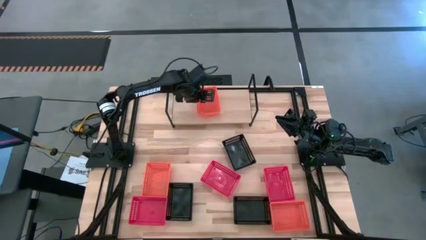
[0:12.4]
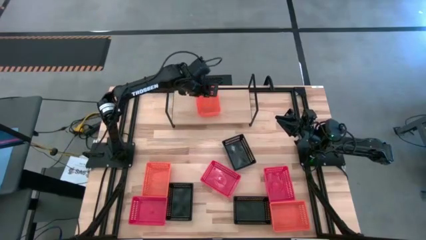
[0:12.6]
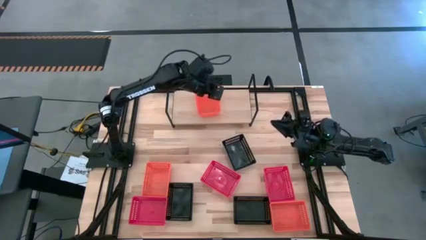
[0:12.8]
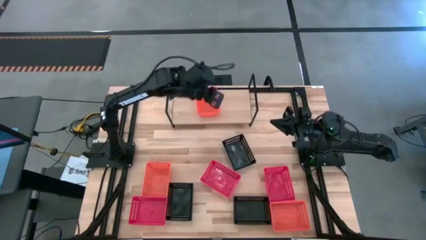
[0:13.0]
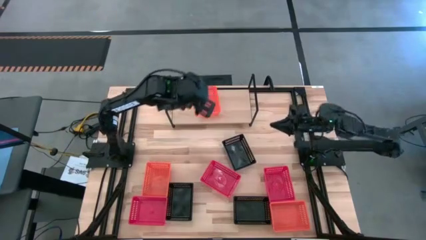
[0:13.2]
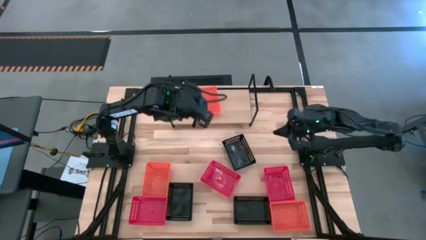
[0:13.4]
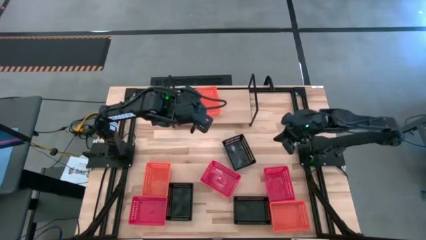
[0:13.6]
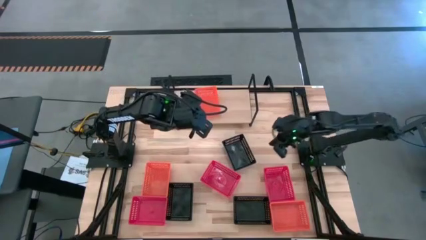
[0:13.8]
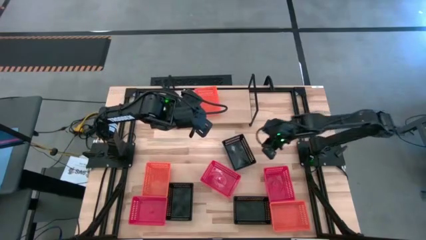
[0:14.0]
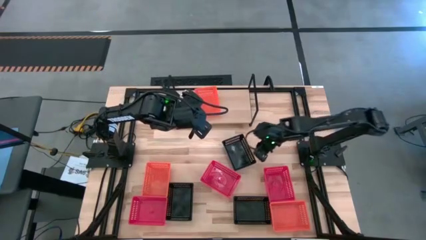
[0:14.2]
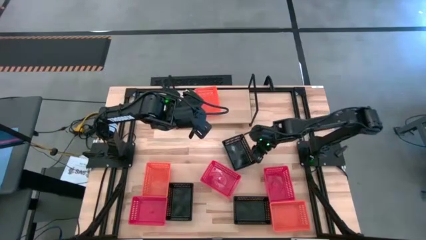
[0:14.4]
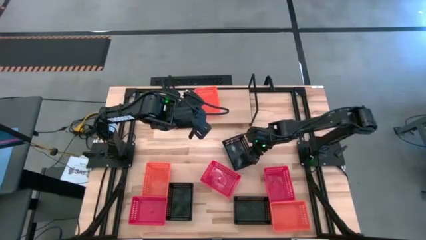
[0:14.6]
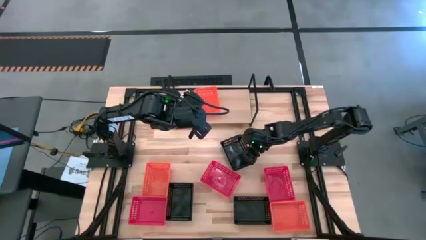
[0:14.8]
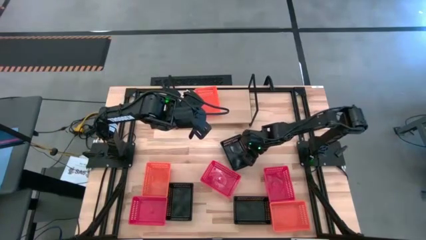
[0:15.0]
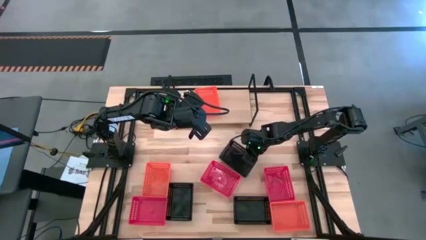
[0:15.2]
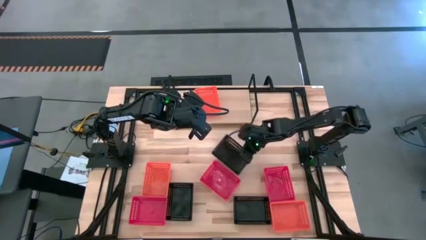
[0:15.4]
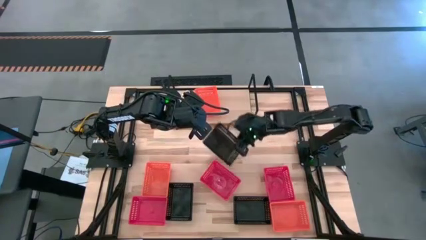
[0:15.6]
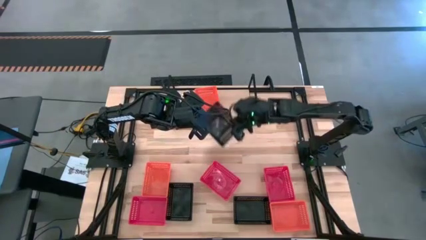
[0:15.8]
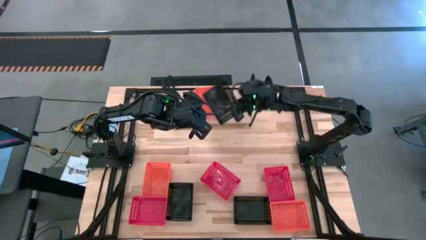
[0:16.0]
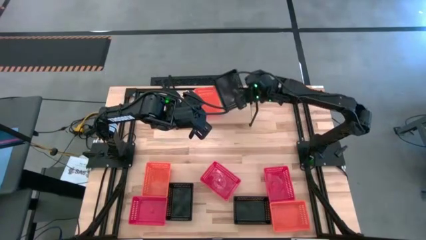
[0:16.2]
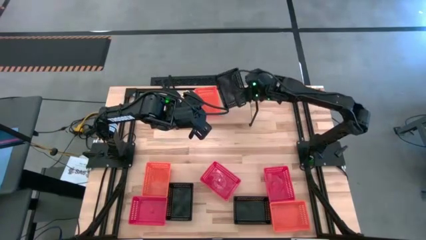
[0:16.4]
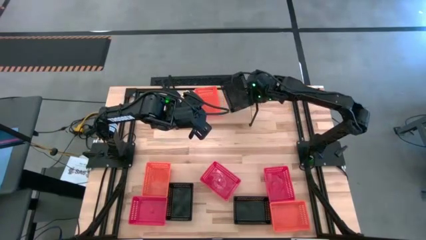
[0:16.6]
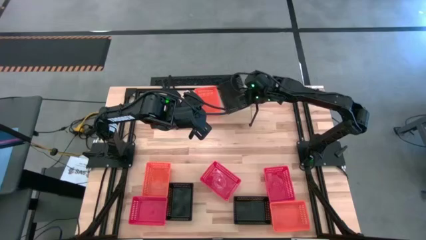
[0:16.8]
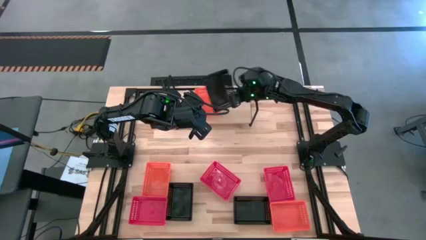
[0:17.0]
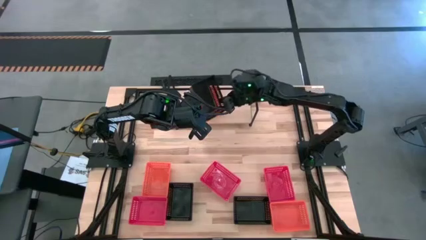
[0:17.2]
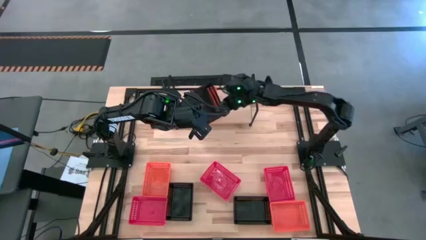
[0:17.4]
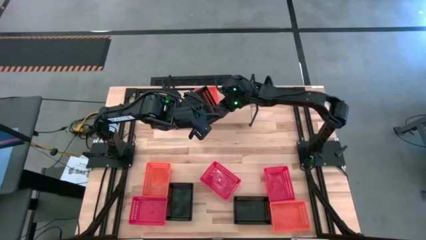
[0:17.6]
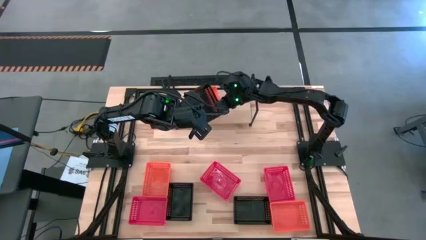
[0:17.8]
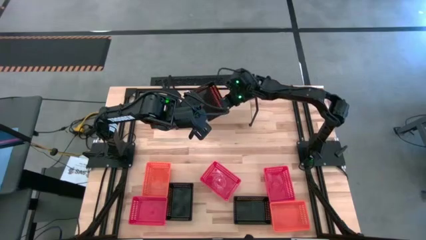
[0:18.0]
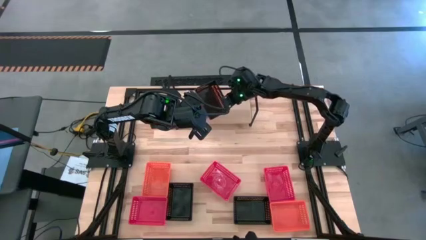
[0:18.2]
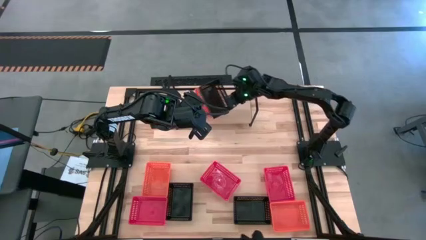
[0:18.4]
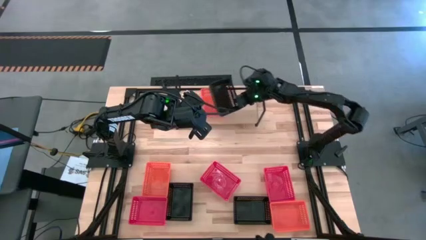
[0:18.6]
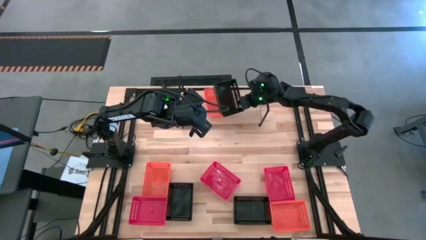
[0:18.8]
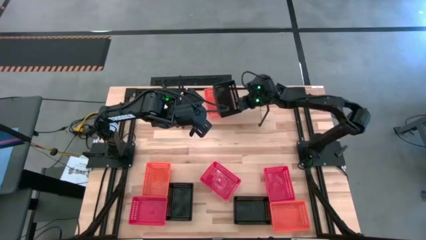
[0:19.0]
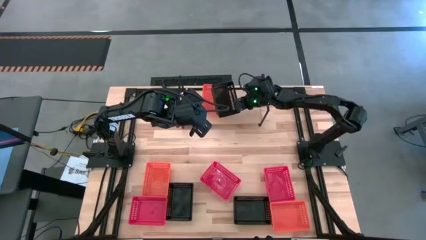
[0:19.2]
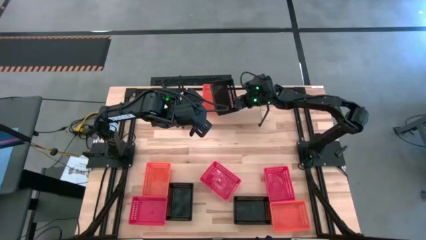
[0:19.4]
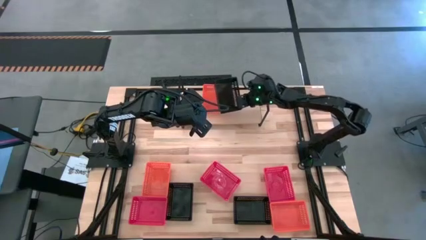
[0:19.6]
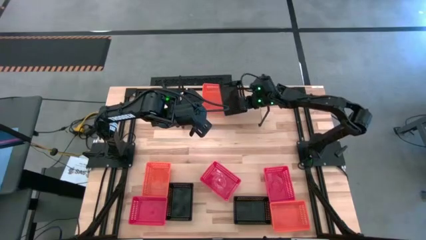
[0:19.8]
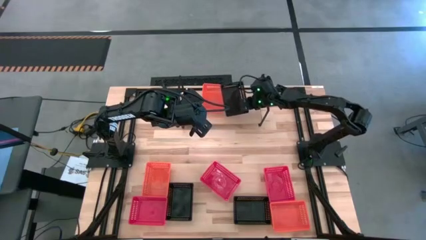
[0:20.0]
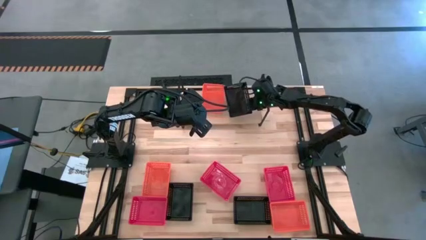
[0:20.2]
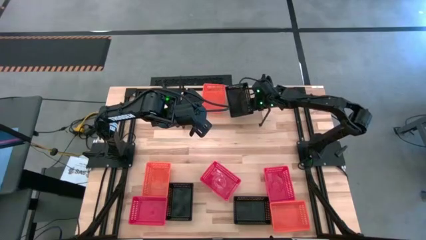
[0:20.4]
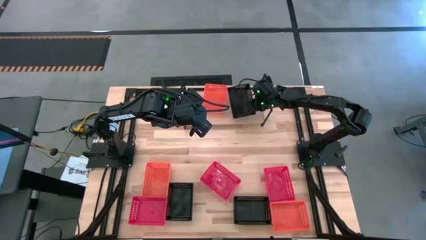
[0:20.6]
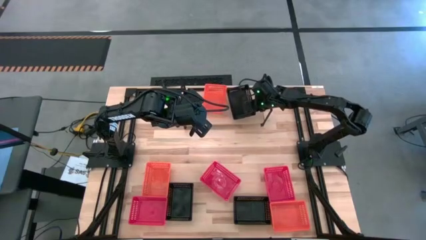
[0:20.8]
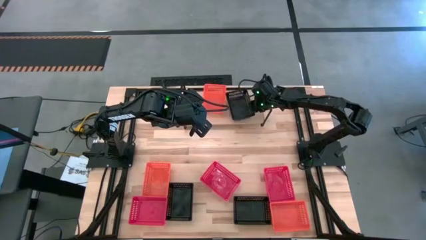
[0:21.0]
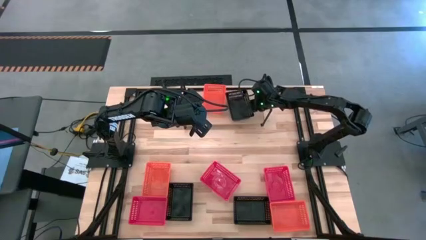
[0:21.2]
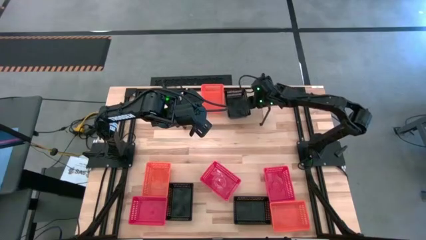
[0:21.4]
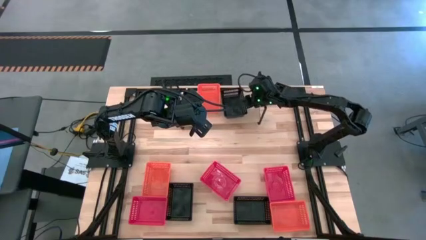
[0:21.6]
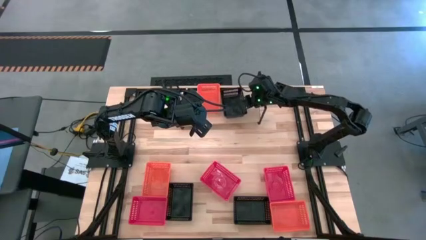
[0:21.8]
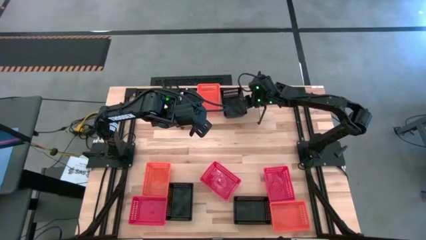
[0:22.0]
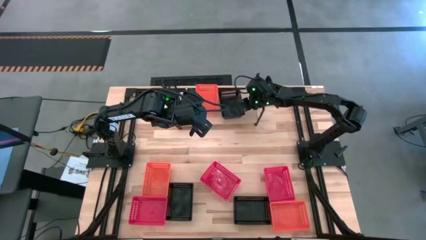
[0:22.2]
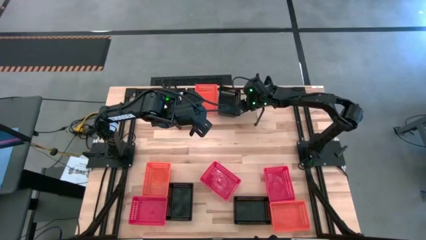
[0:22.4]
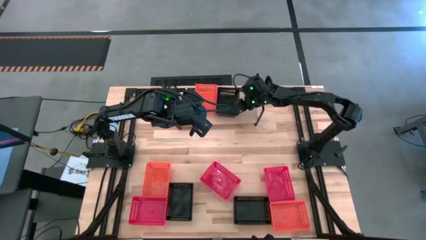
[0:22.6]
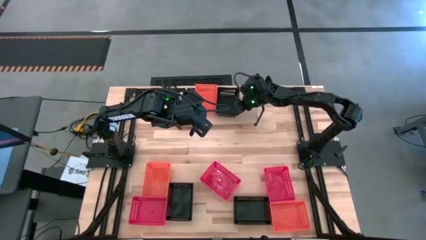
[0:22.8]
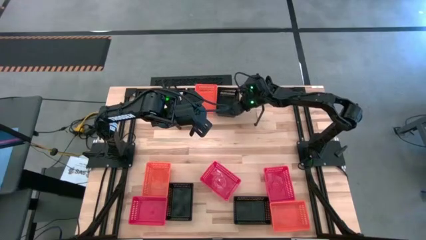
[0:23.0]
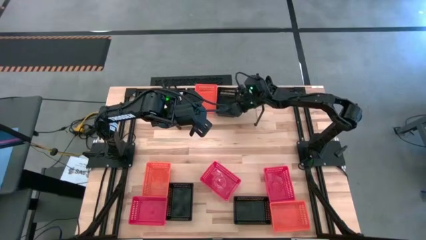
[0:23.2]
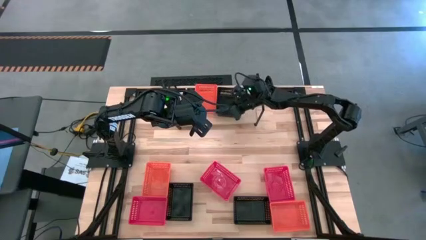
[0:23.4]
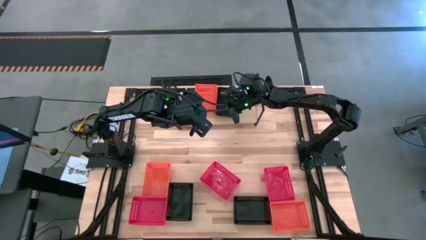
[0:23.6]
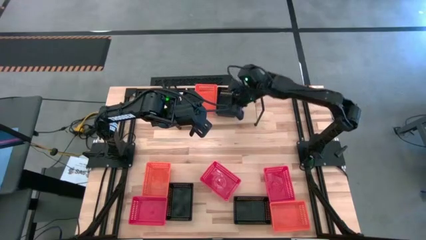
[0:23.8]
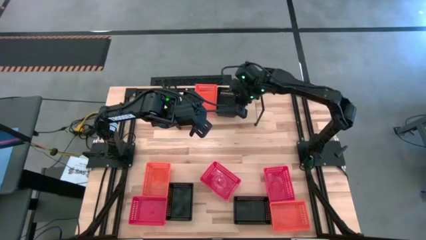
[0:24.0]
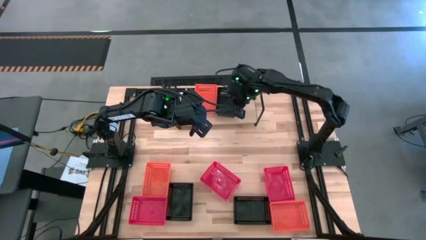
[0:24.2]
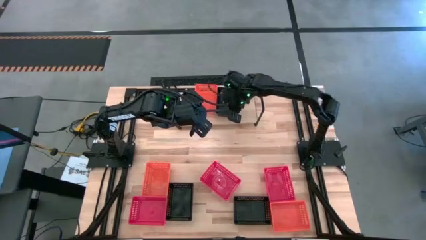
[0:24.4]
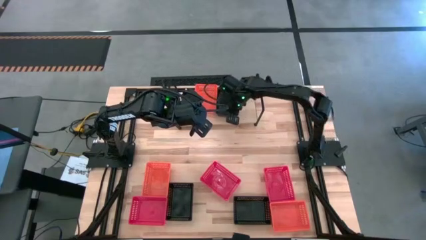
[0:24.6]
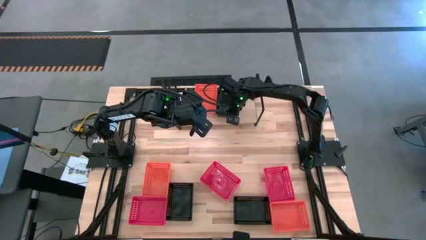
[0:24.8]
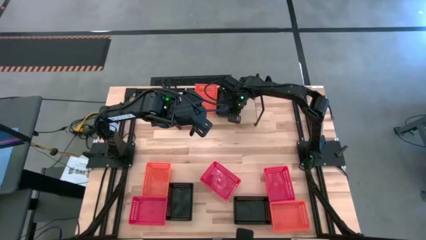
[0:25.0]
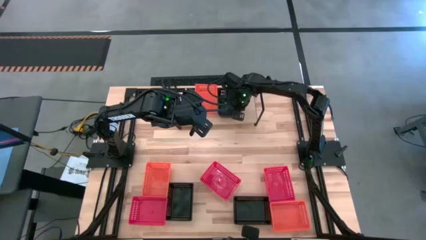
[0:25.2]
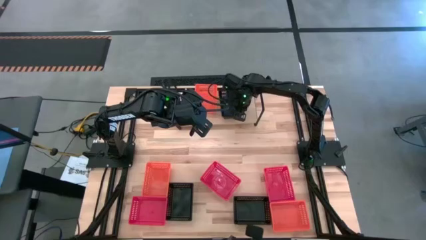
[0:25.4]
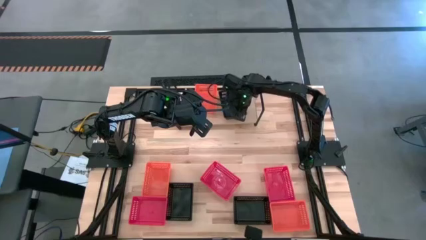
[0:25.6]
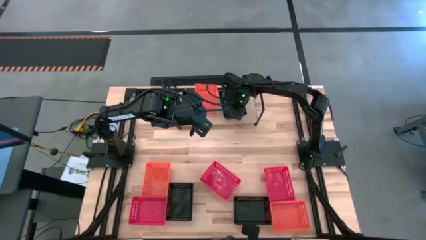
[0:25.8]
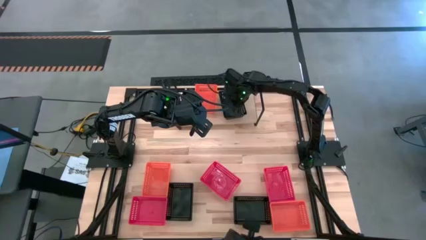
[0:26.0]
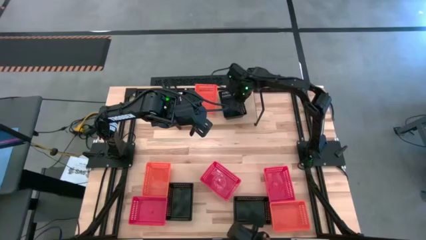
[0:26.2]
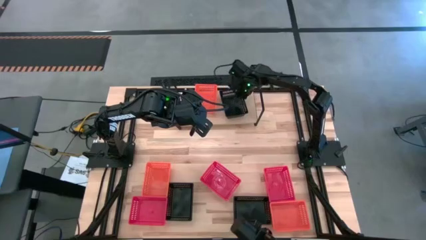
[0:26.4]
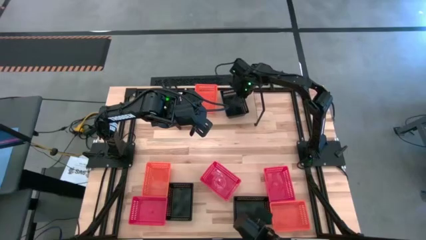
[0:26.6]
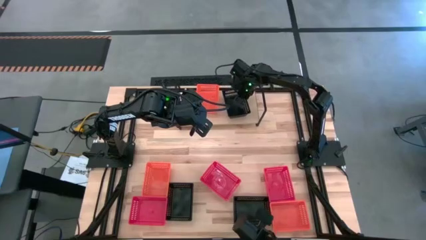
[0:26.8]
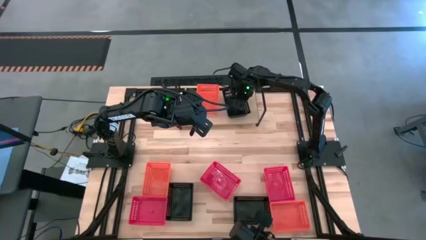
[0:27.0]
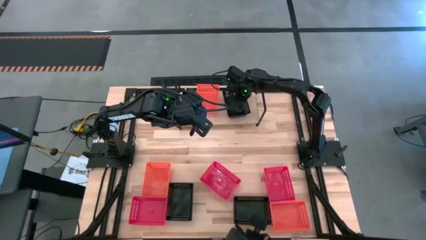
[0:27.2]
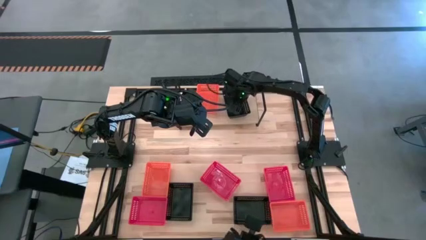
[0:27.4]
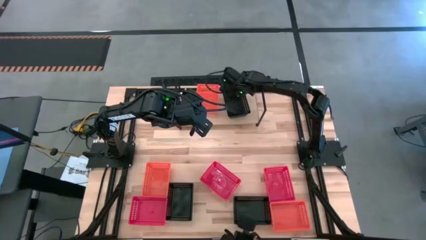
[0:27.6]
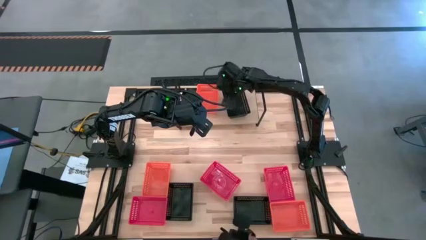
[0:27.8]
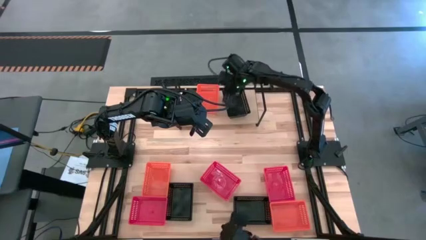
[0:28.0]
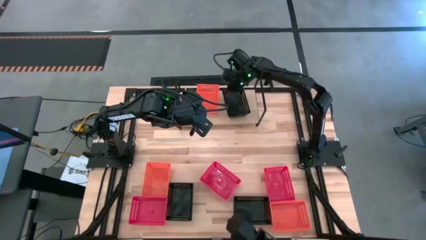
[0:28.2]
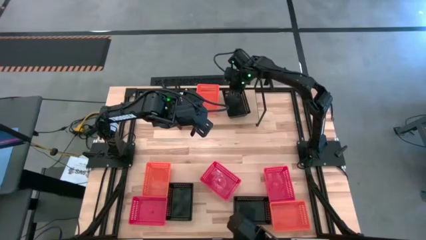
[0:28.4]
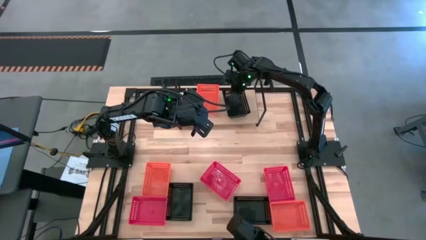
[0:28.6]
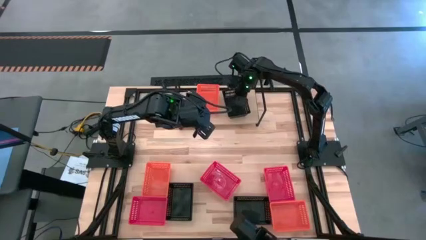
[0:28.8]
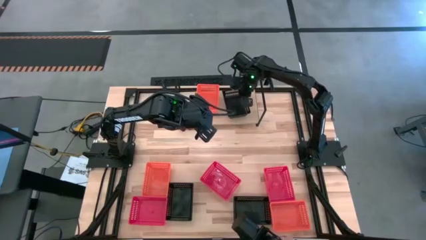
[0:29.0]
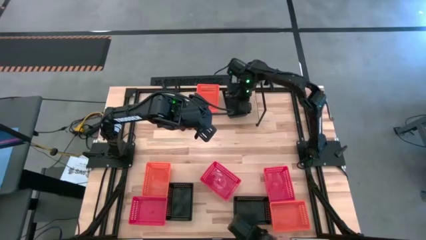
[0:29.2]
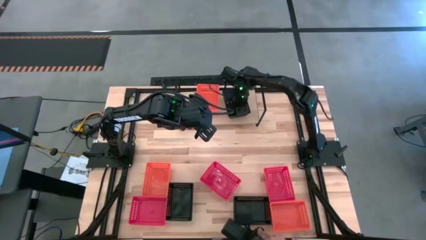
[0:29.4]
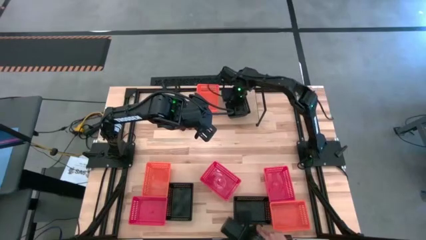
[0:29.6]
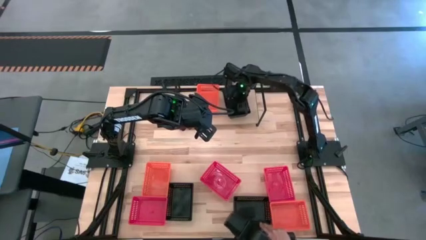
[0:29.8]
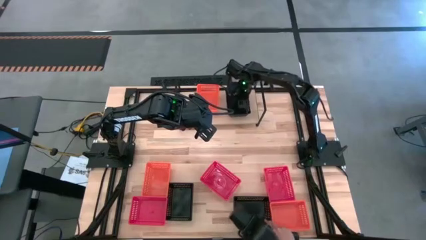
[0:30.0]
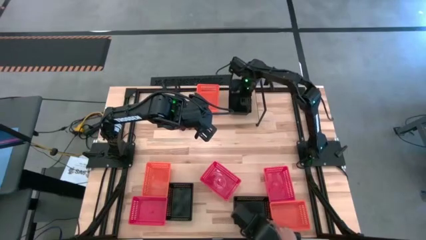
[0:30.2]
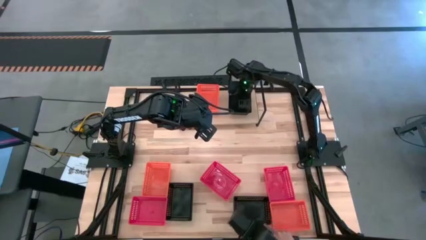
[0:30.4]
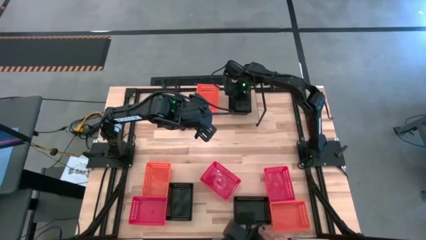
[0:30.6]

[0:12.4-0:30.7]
Task: Stack baskets on shelf by color
Put the top center black bin on the shelf
